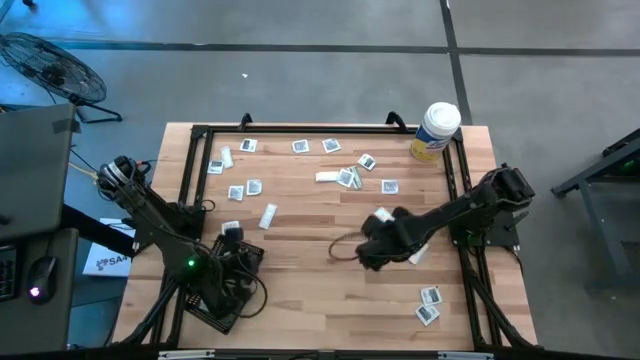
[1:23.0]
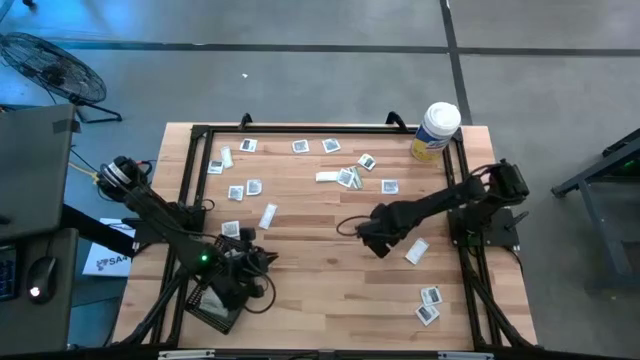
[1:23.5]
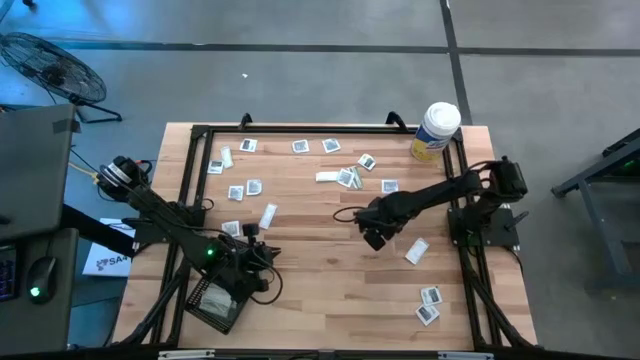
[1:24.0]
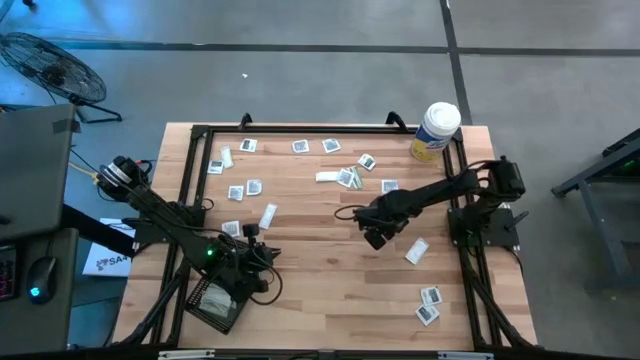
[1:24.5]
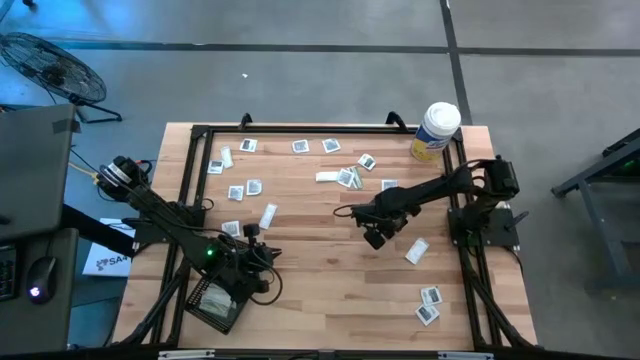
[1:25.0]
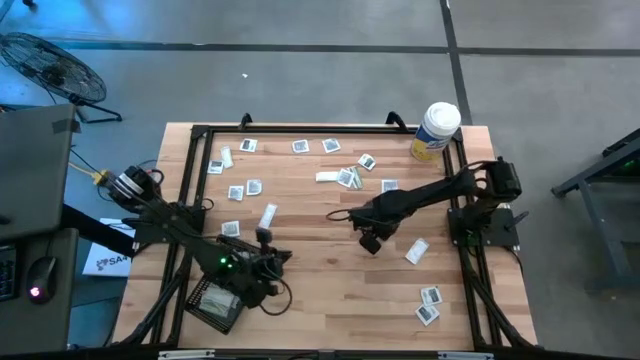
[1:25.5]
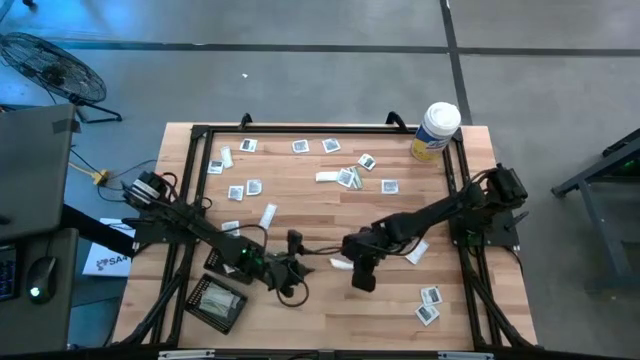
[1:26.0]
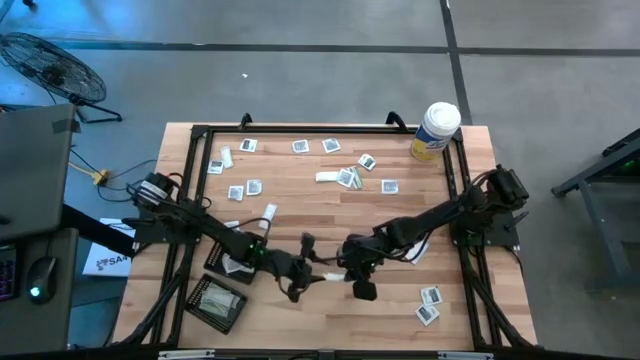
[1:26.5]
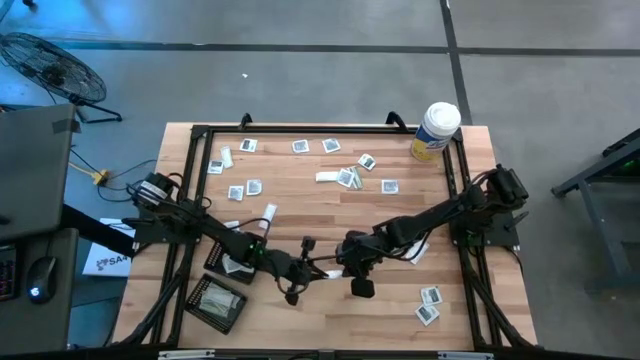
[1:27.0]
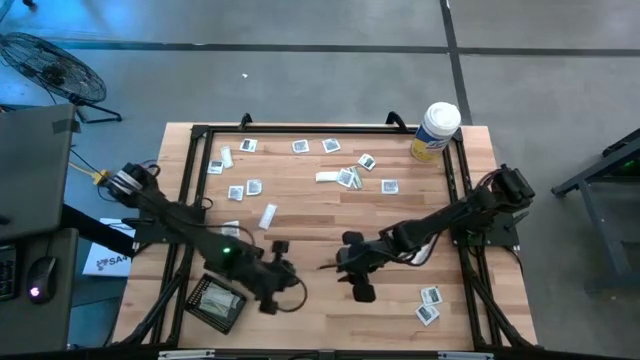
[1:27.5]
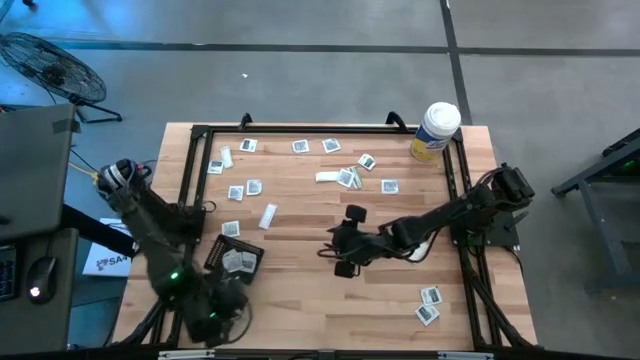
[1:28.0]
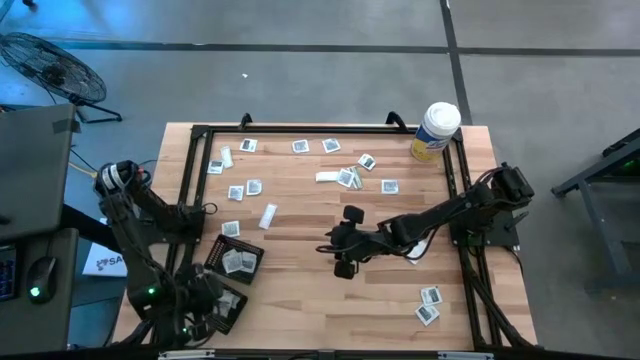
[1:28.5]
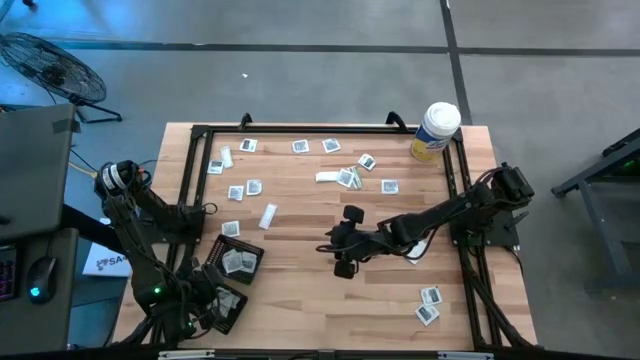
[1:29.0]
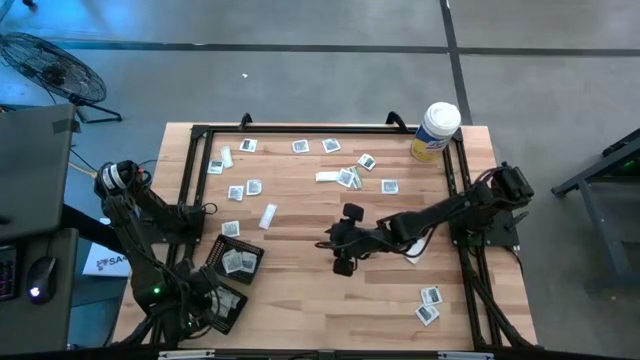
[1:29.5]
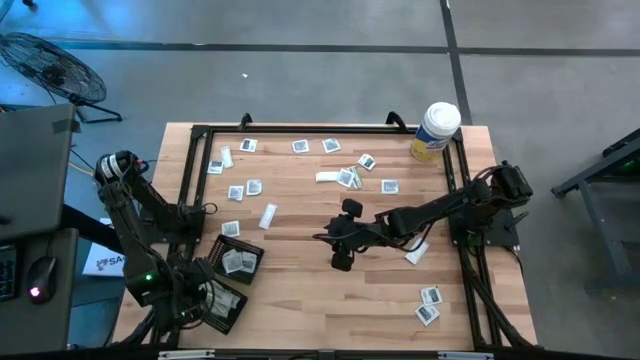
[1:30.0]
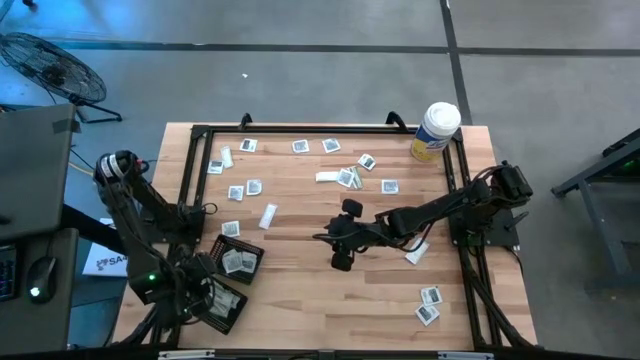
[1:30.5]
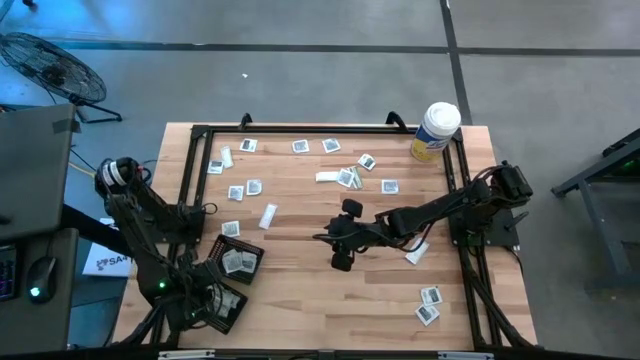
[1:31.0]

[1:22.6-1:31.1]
Task: Pick & Place First Aid Supplies
Put the bandage into the bottom black bin

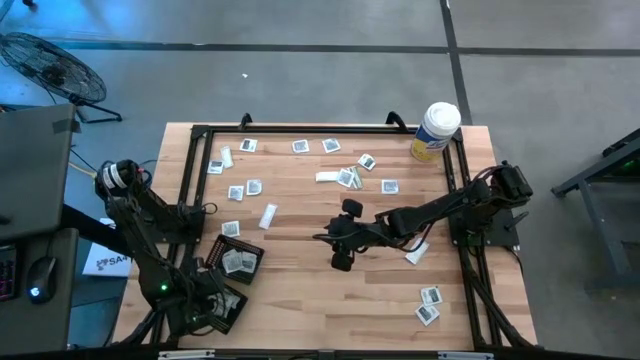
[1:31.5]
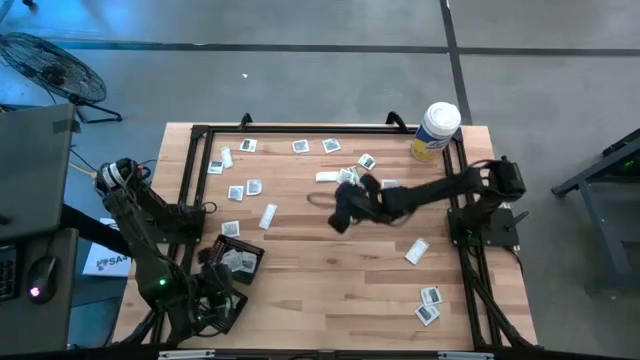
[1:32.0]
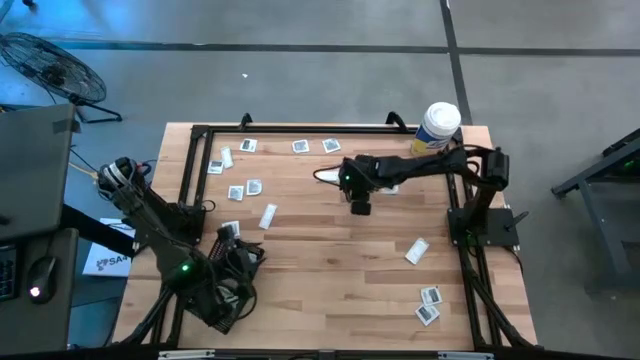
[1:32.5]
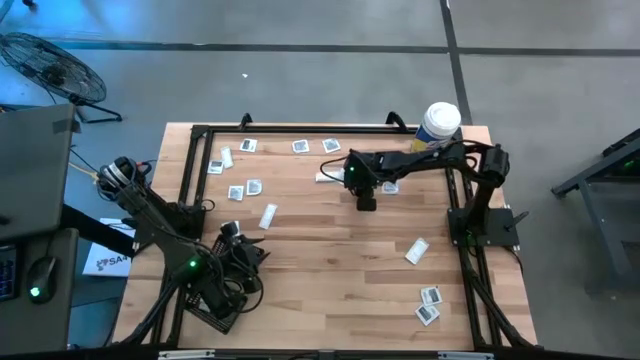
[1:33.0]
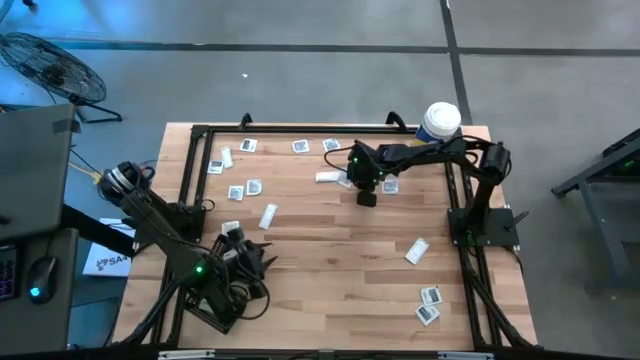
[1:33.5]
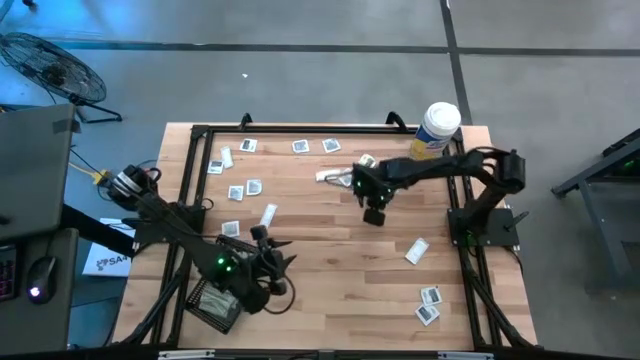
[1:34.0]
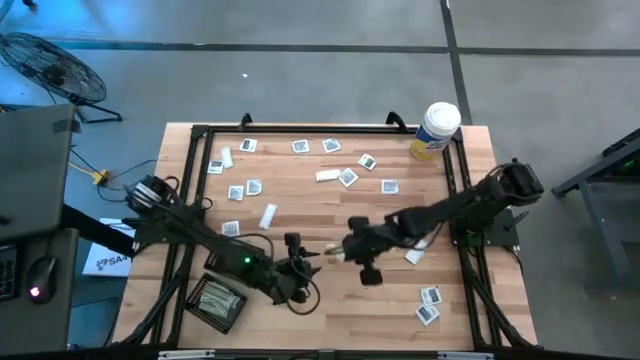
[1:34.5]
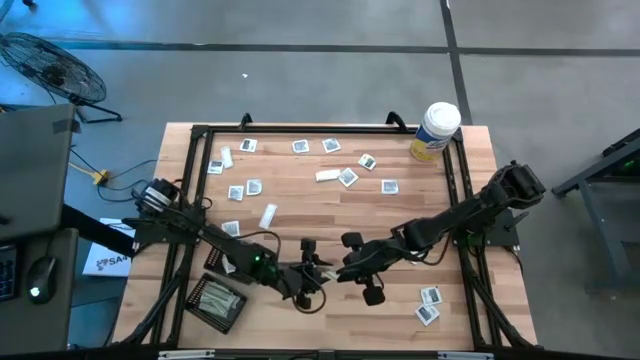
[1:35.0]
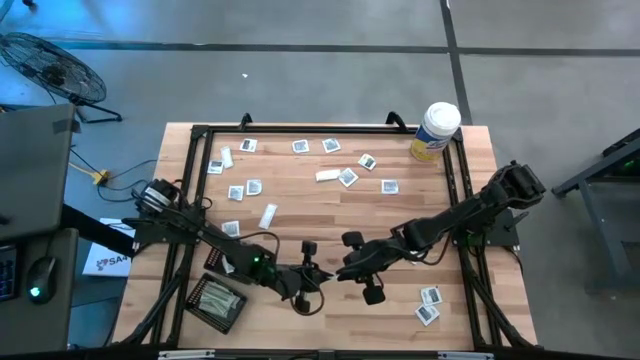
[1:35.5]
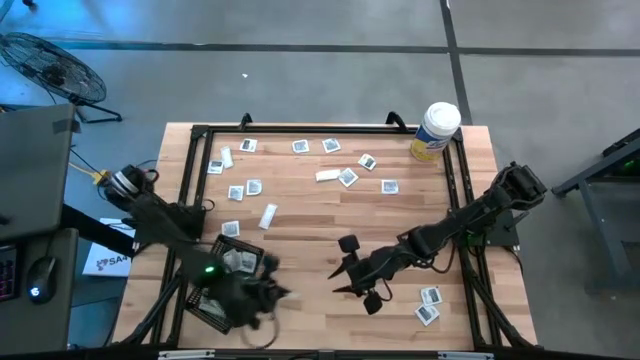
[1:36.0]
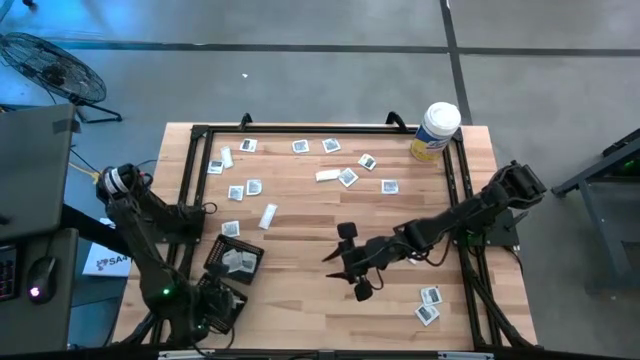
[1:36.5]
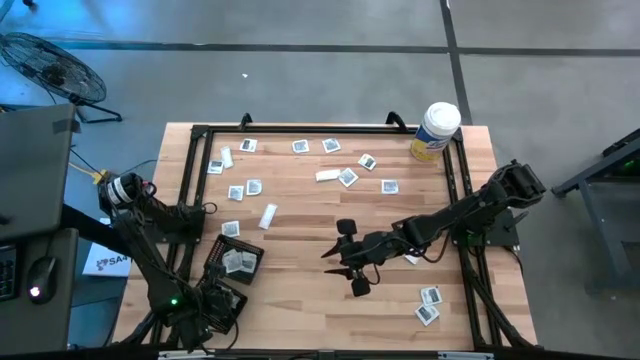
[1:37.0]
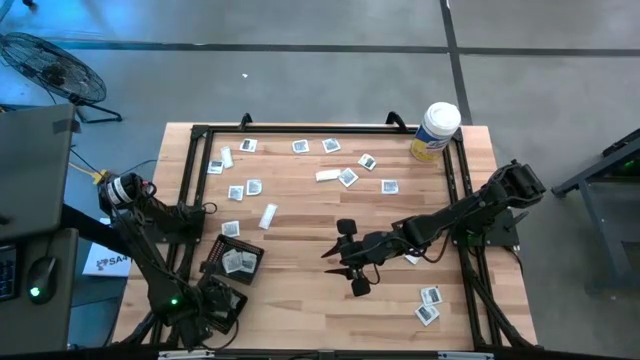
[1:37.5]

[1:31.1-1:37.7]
Put the bandage into the bottom black bin

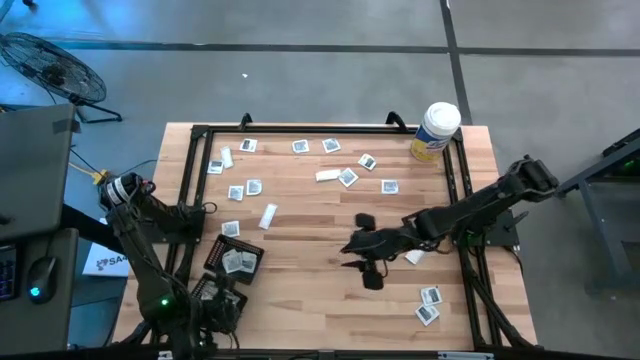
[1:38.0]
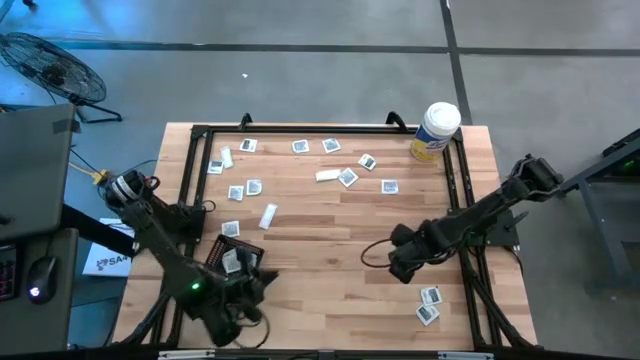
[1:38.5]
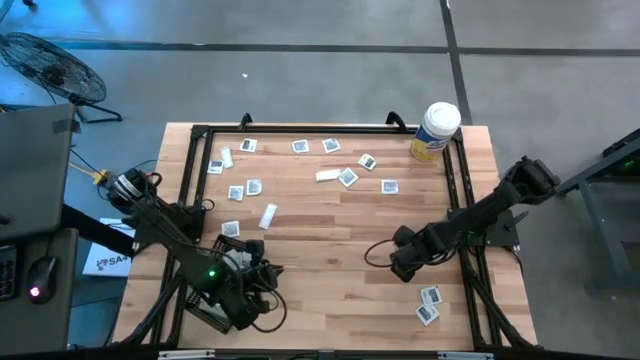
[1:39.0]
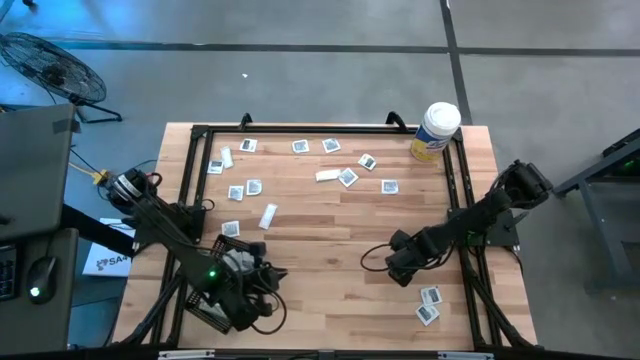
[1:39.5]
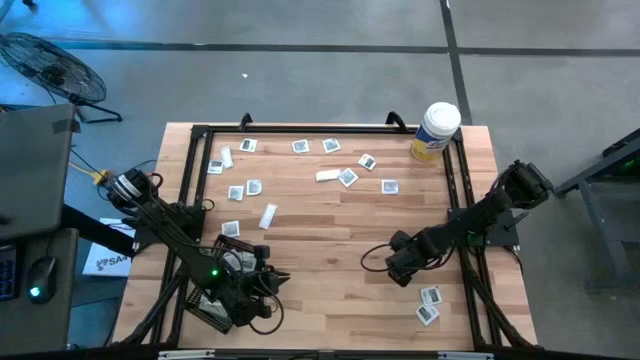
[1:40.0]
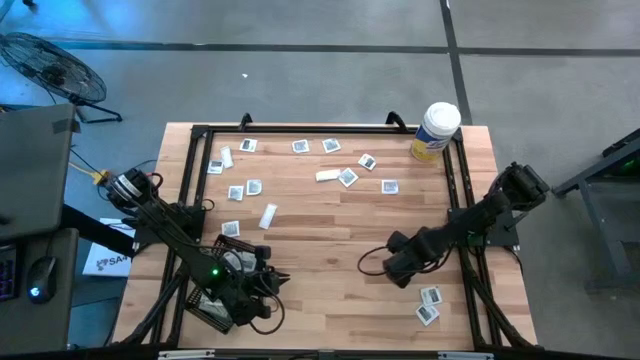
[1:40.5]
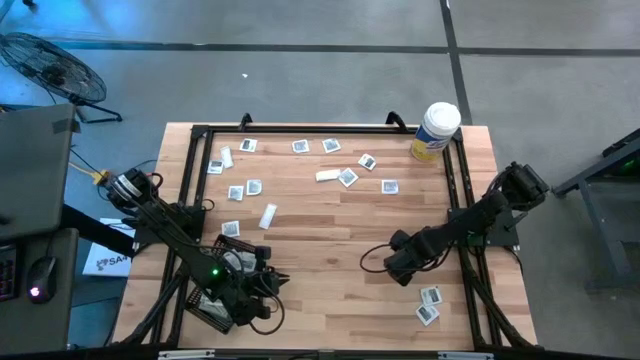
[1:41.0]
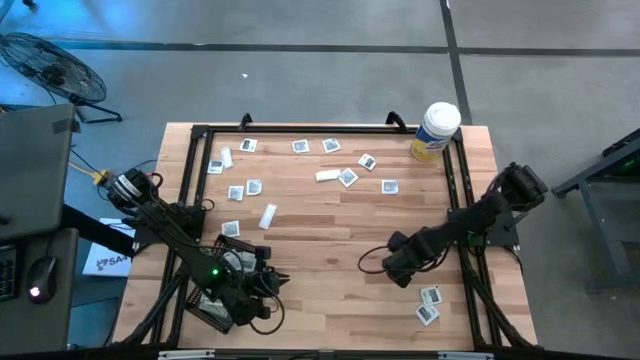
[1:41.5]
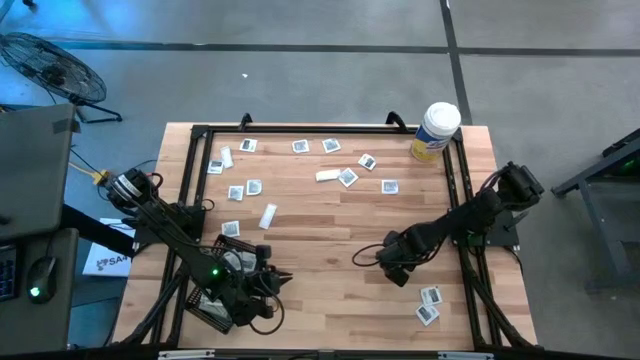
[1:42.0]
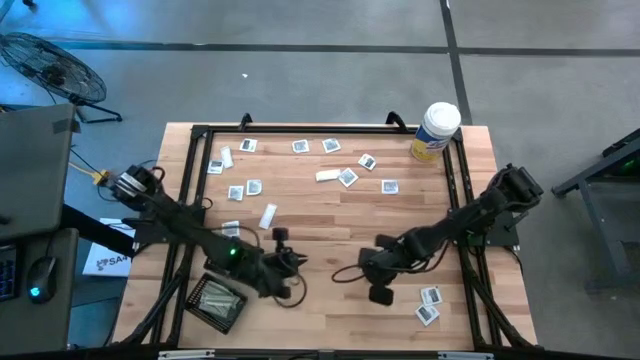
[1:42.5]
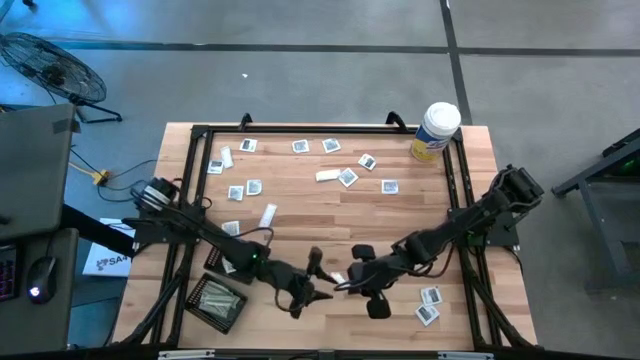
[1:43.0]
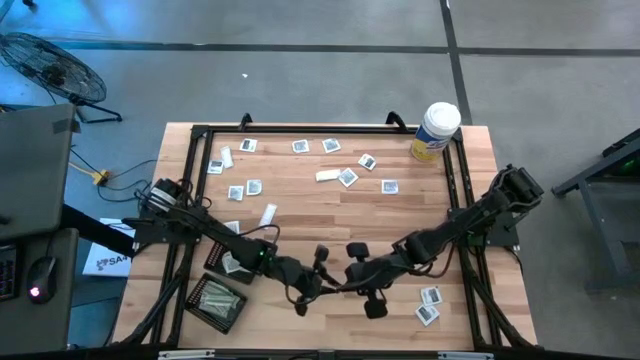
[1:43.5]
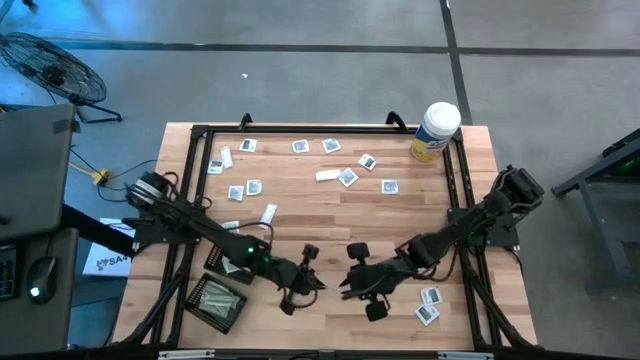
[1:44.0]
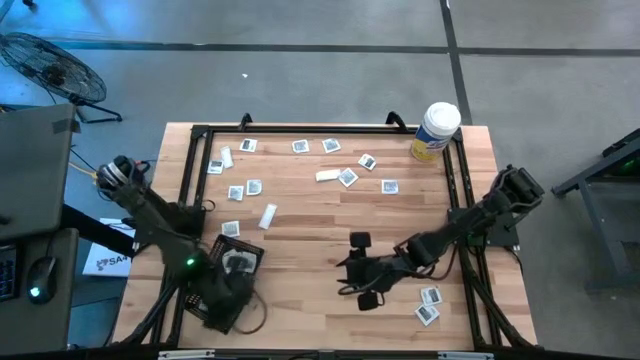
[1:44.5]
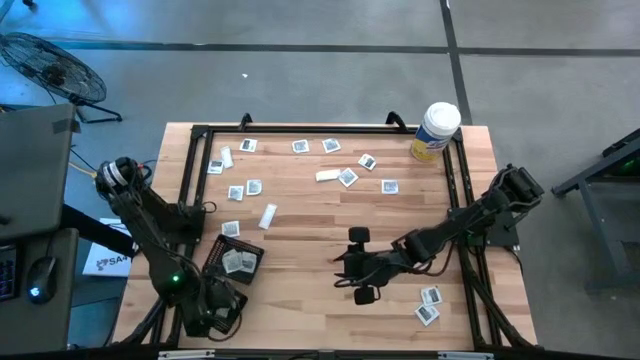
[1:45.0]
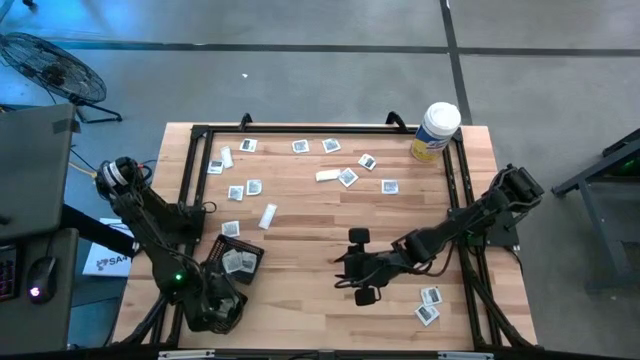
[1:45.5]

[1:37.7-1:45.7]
Put the bandage into the bottom black bin
